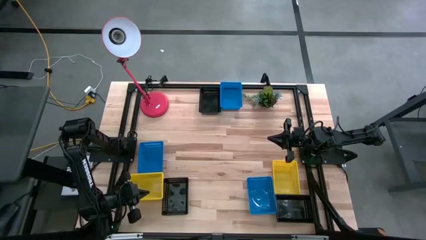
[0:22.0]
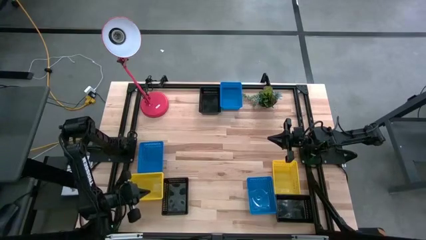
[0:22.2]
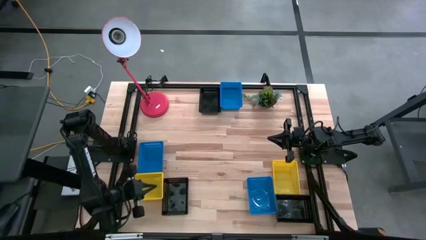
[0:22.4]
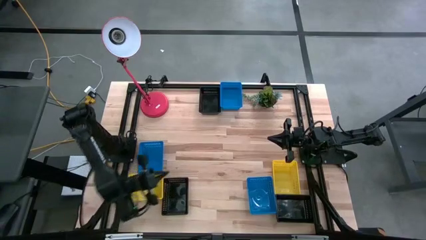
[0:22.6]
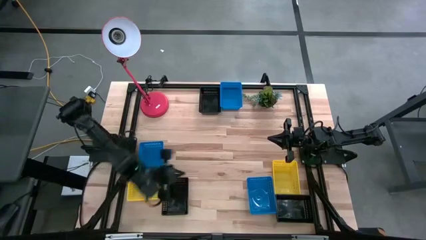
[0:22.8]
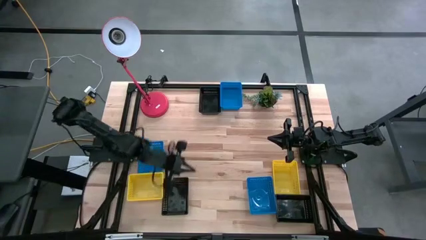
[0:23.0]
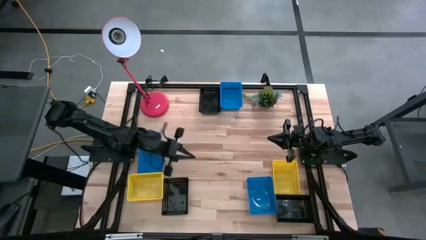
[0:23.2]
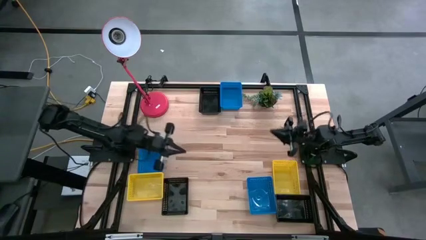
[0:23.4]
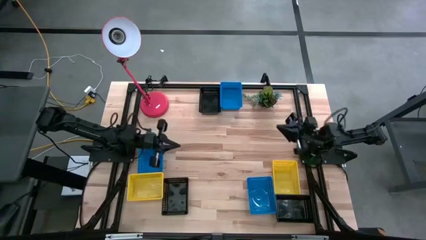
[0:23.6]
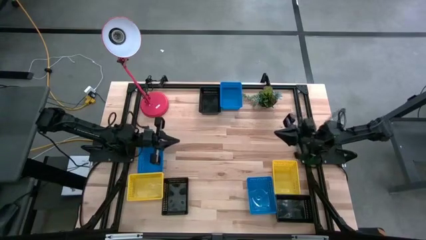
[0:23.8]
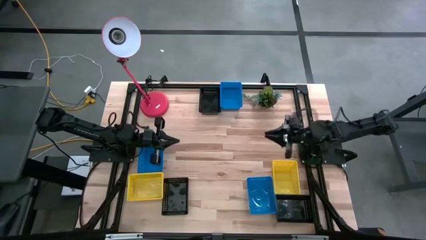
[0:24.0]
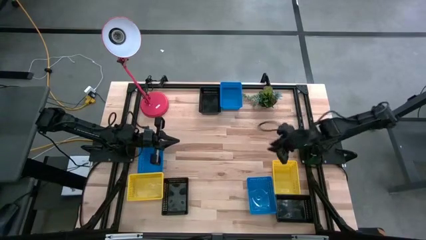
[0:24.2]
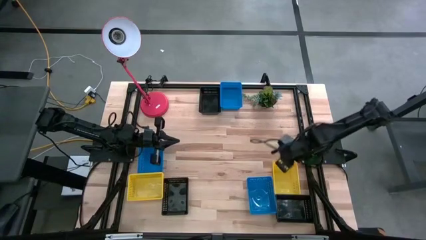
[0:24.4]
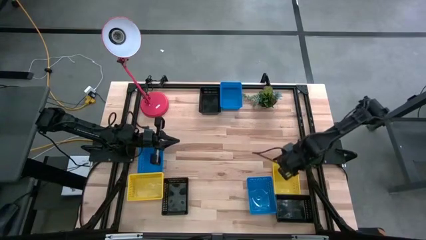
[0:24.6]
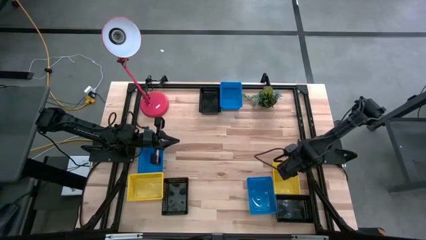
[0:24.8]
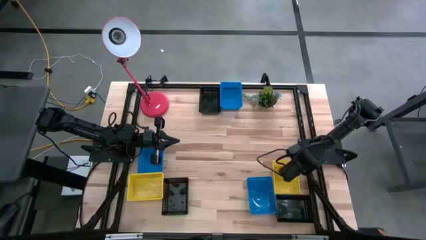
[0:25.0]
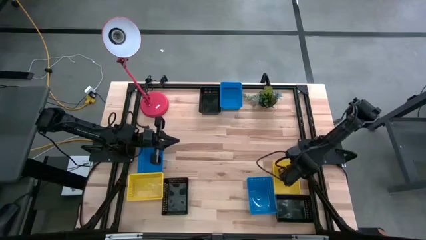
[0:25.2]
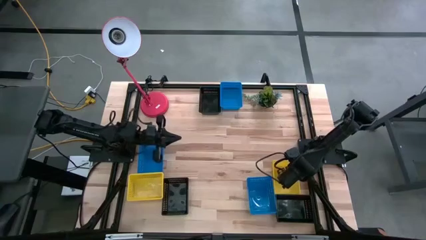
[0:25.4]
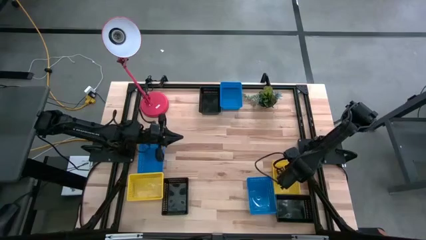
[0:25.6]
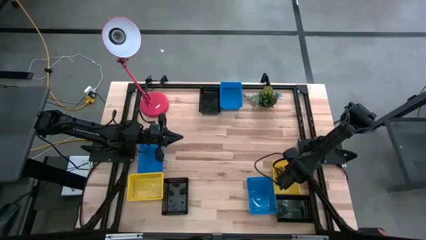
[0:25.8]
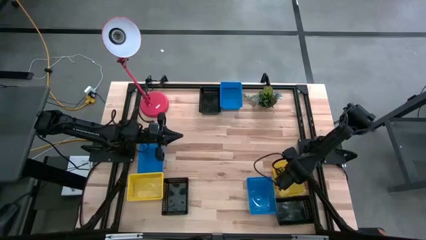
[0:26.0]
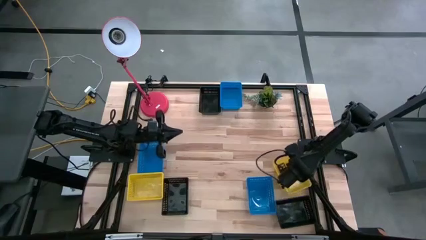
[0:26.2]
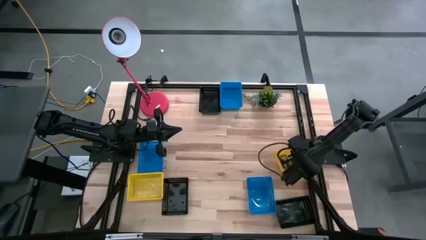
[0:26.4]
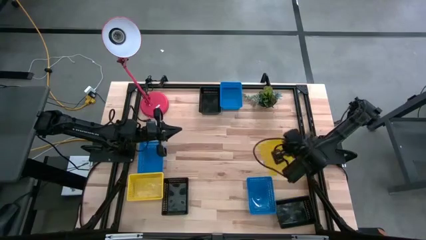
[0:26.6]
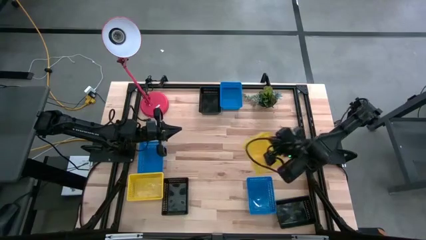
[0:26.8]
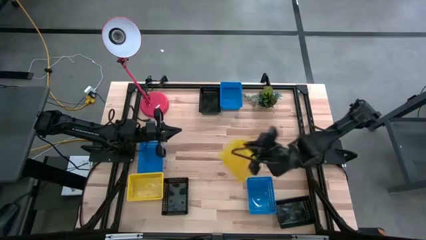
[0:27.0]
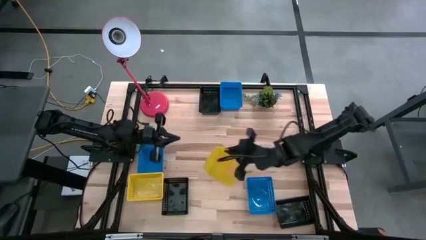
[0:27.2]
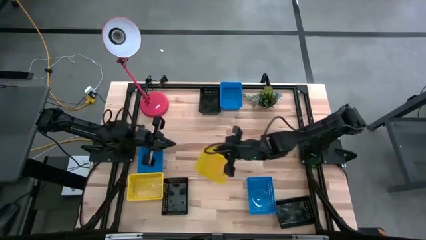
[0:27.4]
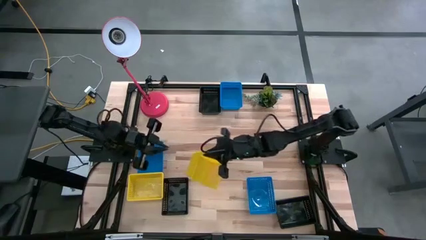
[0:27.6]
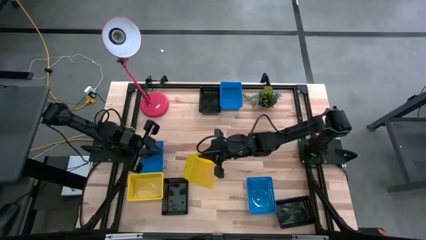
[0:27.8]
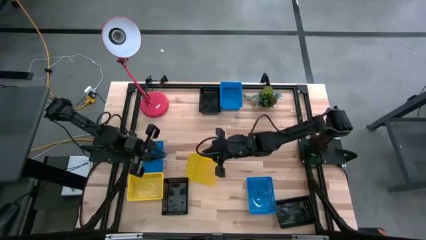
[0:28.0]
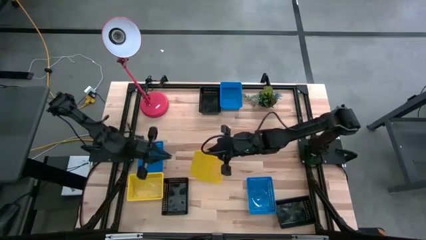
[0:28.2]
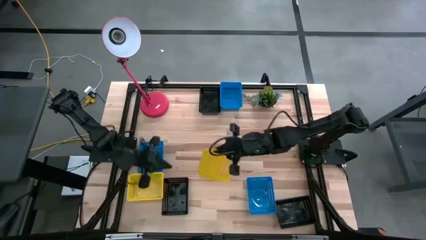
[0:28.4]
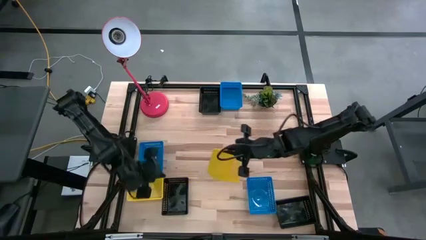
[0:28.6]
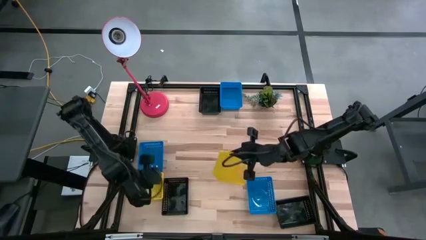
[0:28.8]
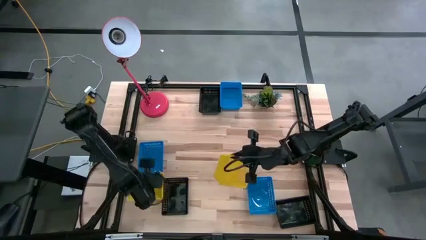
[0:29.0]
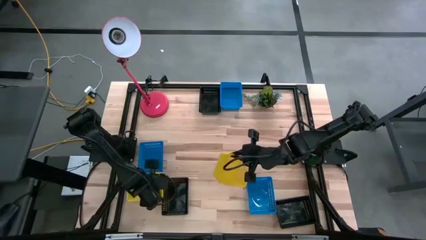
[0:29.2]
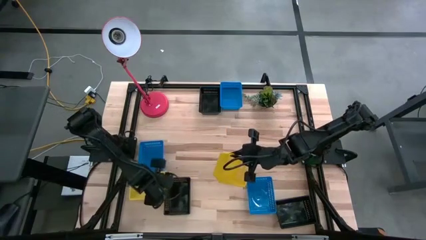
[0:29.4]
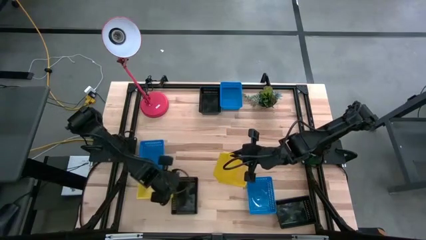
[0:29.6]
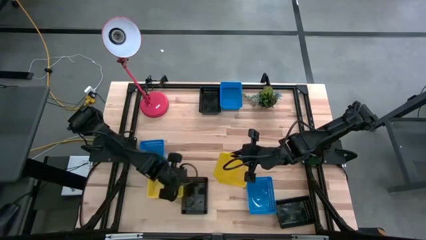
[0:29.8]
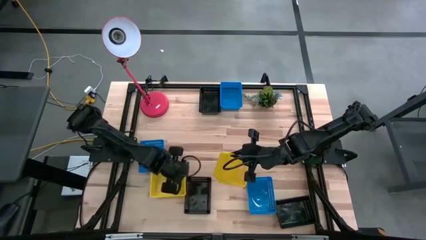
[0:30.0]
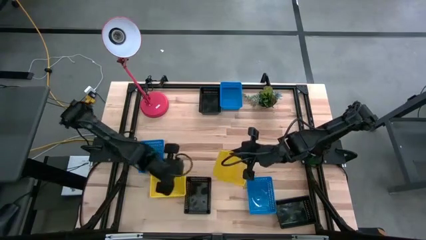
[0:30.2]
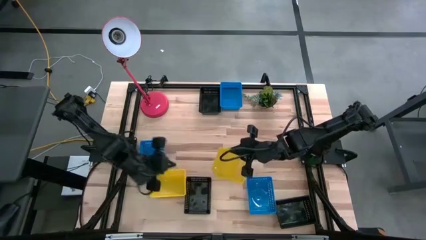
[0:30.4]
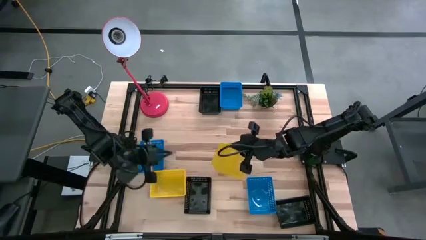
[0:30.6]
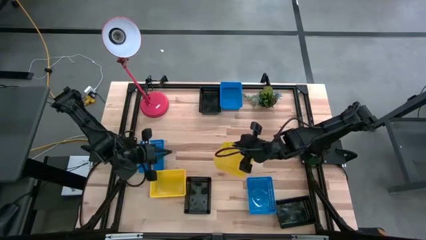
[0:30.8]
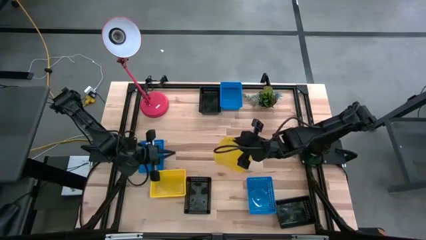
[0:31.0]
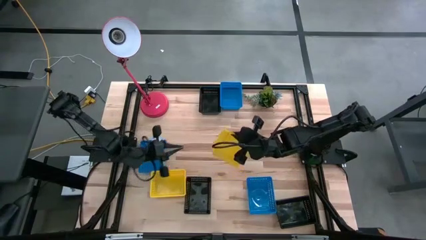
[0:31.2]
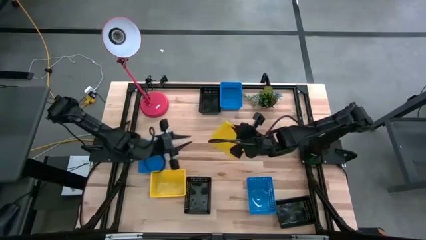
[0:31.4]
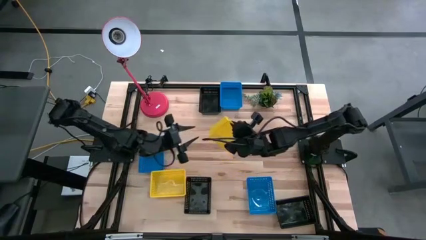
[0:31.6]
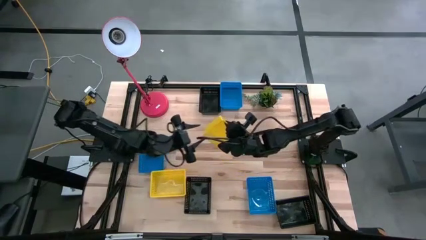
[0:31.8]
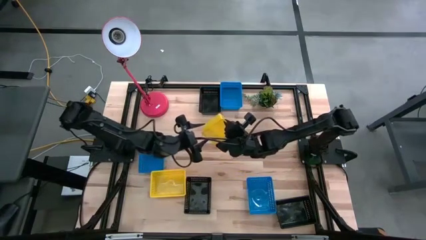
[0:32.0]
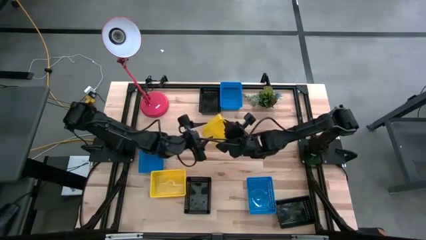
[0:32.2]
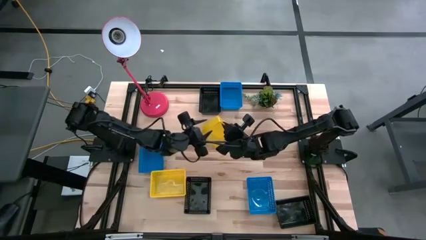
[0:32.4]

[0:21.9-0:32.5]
Stack the right yellow bin on the left stacked yellow bins
